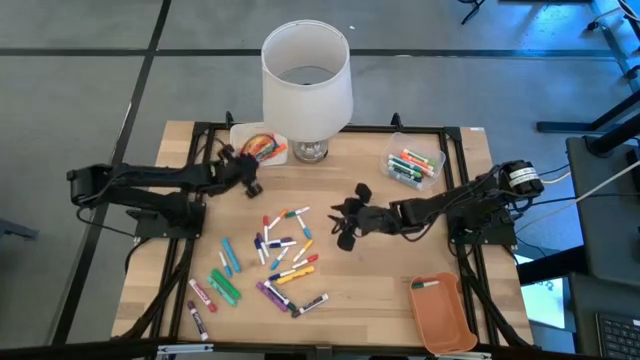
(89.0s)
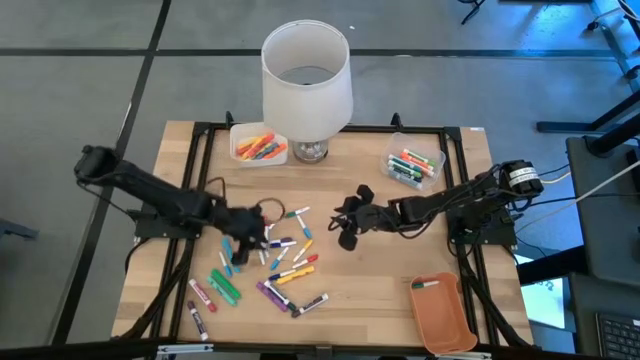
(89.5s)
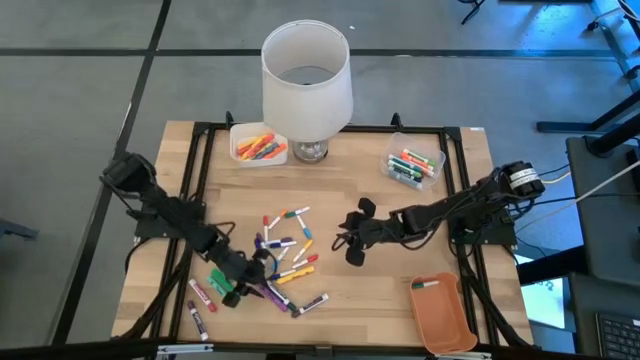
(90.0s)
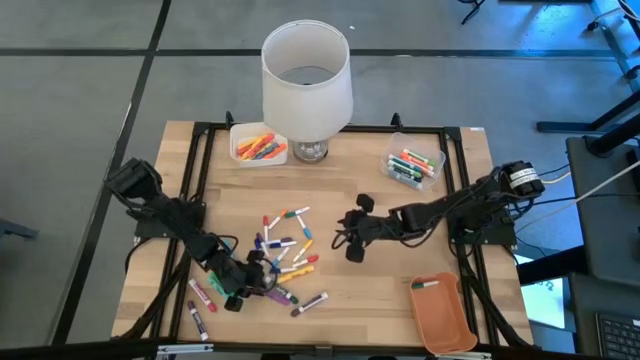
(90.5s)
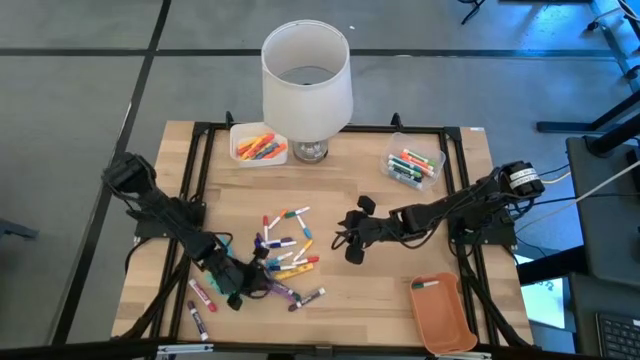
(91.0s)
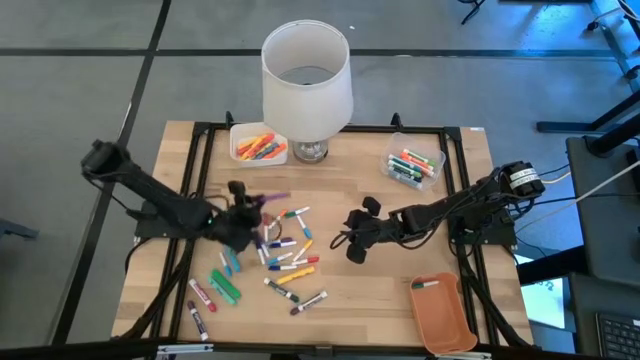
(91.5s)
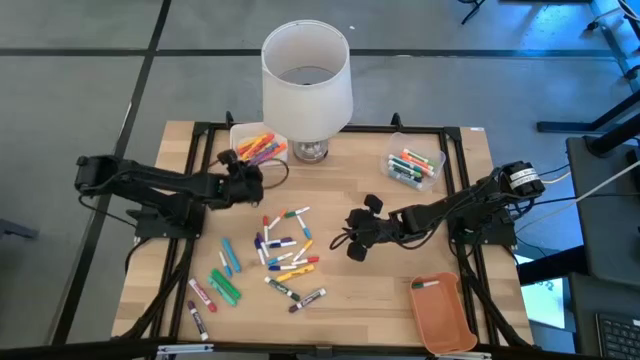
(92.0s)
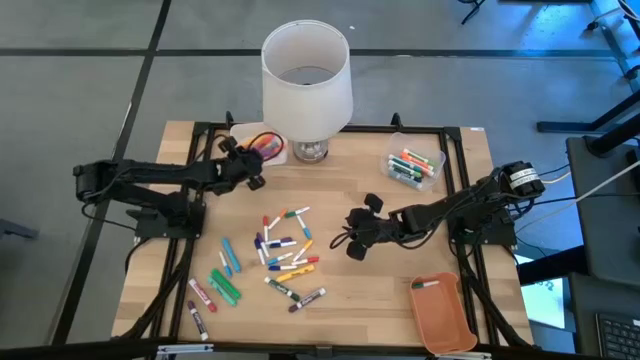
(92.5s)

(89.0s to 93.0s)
Task: Pick & Place Markers
Put the purple highlighter into the white bin

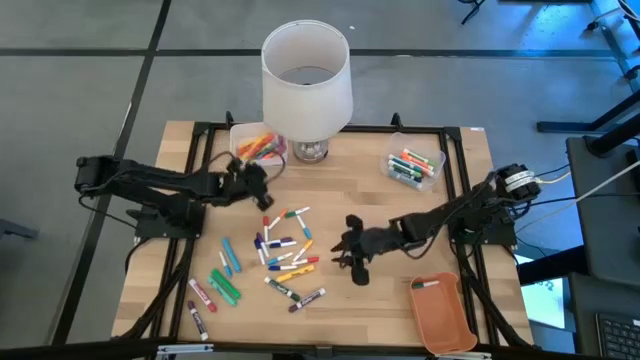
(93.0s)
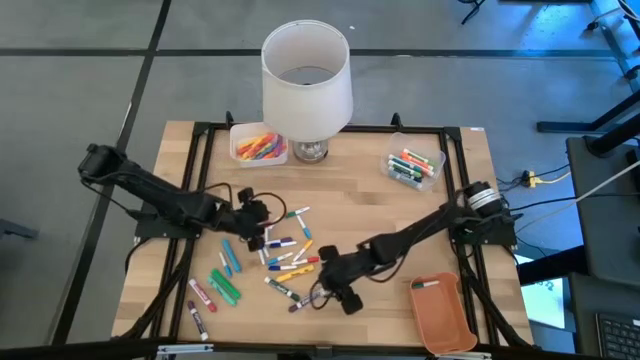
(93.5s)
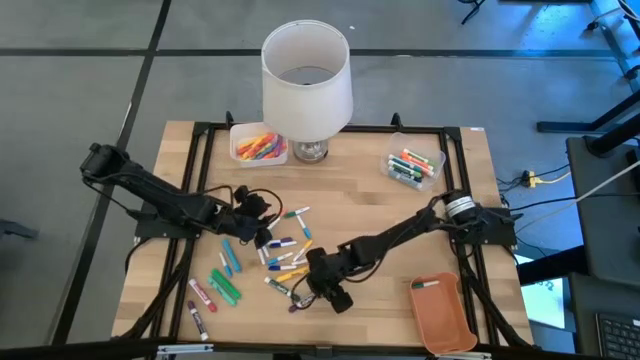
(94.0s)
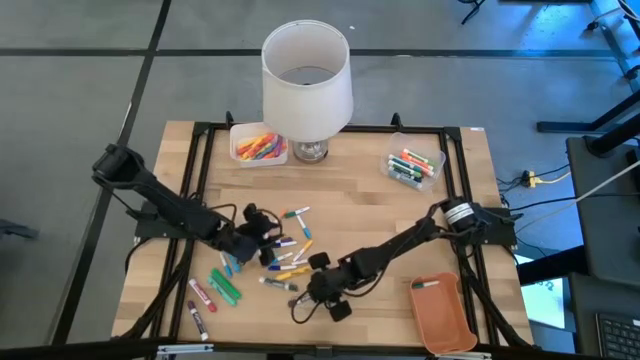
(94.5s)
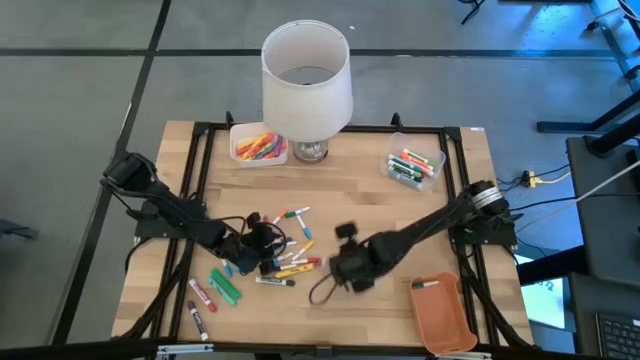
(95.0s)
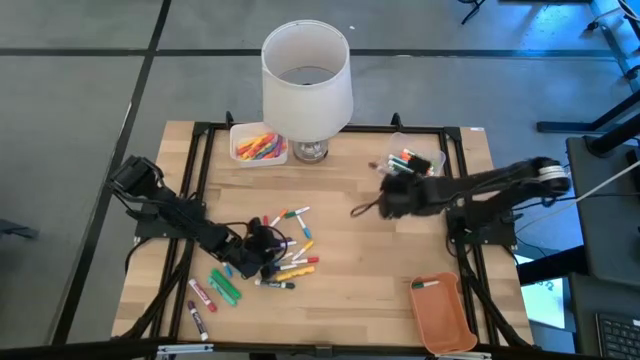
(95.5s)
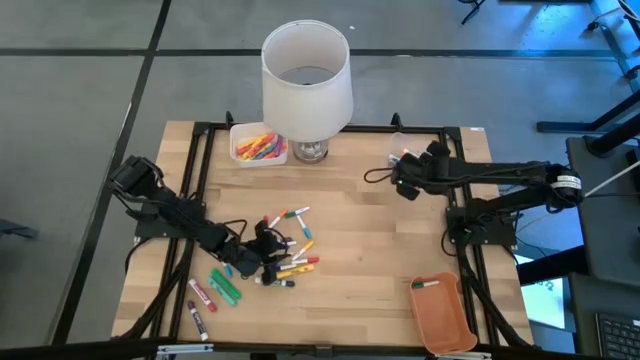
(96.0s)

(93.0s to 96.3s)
Put the thick purple dry erase marker into the transparent bin

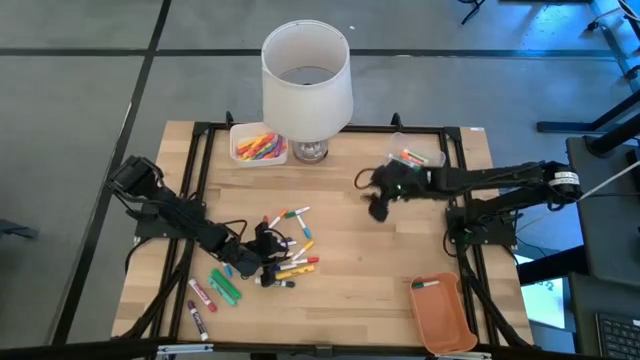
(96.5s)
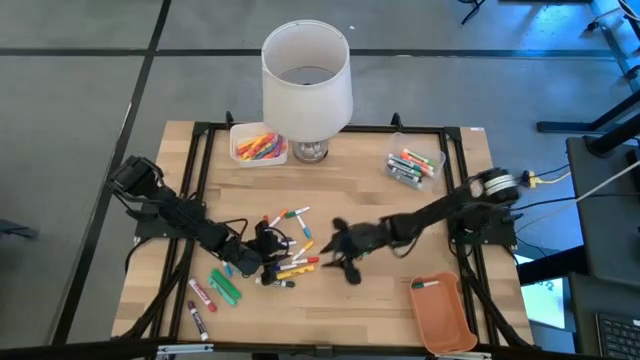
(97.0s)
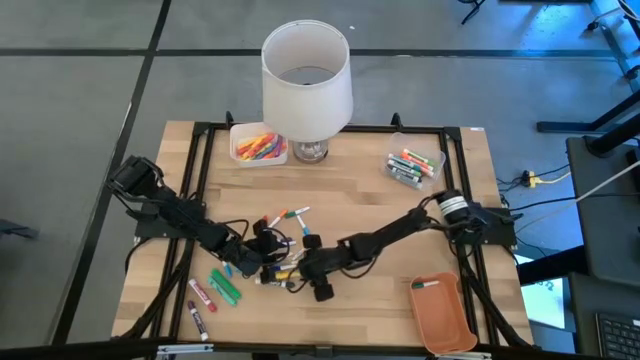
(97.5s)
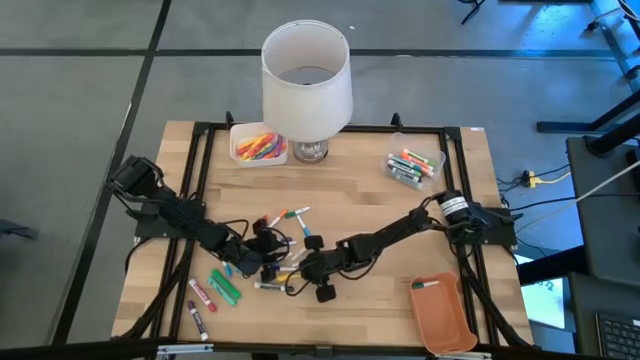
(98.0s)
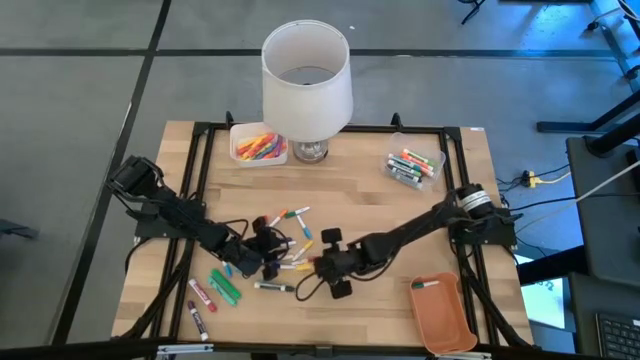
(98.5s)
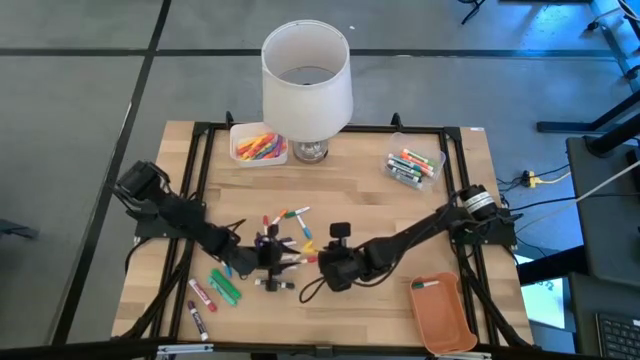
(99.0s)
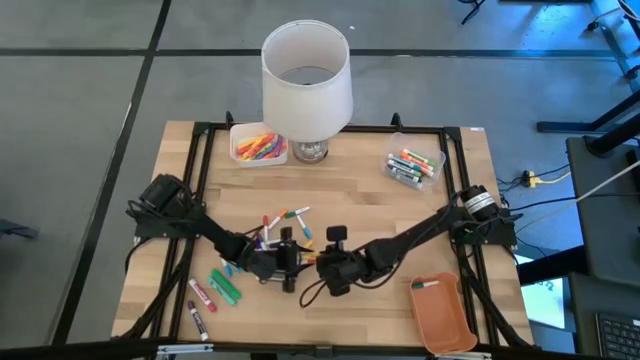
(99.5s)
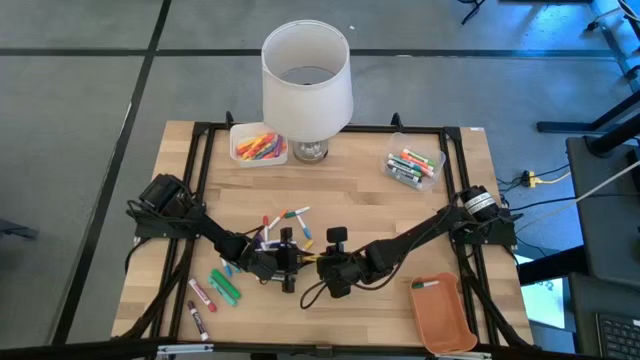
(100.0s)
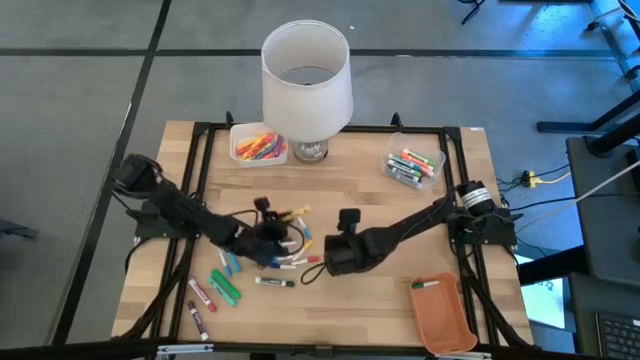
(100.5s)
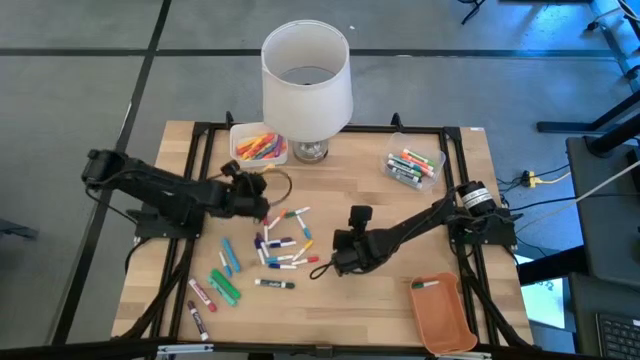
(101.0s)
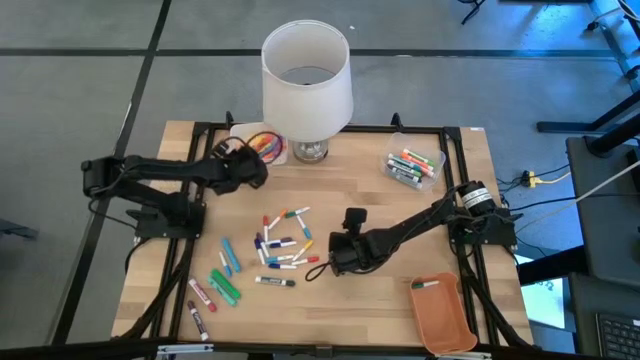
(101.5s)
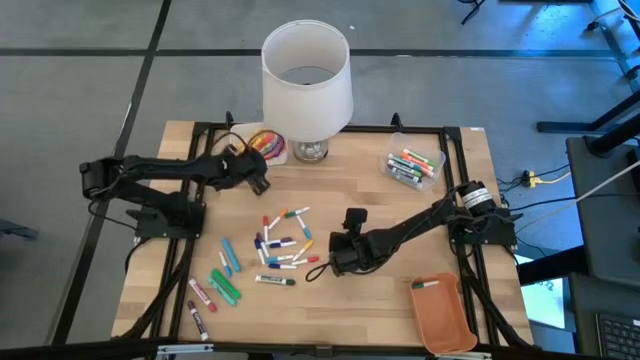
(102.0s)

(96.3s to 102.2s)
Put the yellow highlighter into the white bin

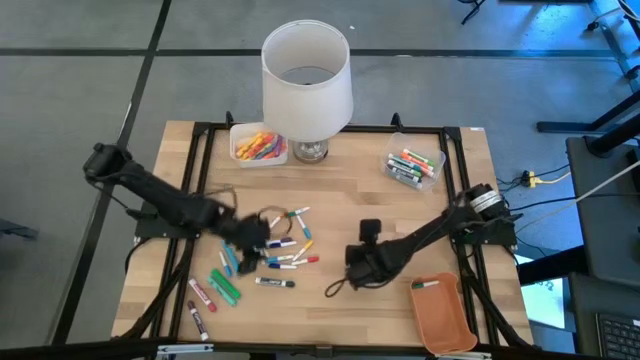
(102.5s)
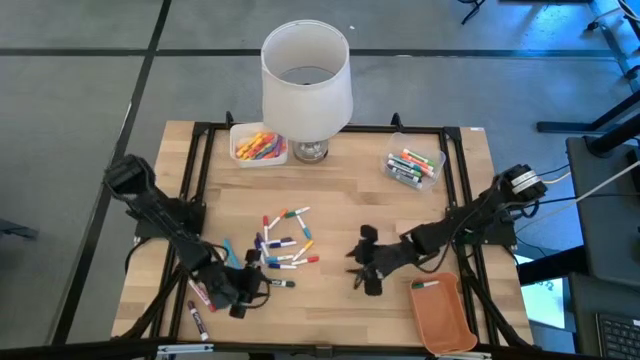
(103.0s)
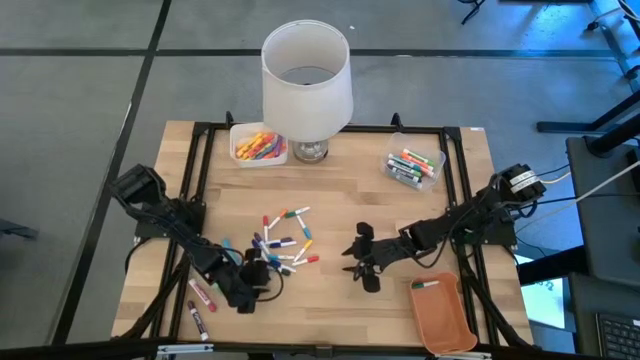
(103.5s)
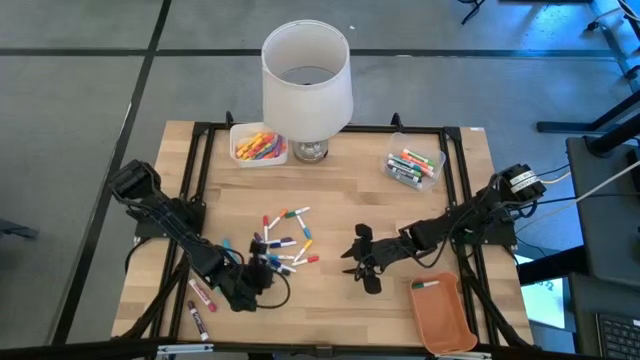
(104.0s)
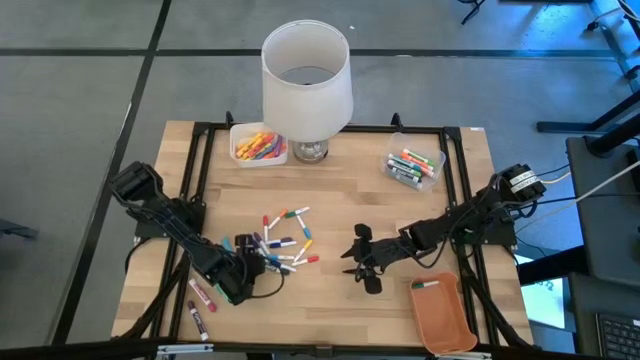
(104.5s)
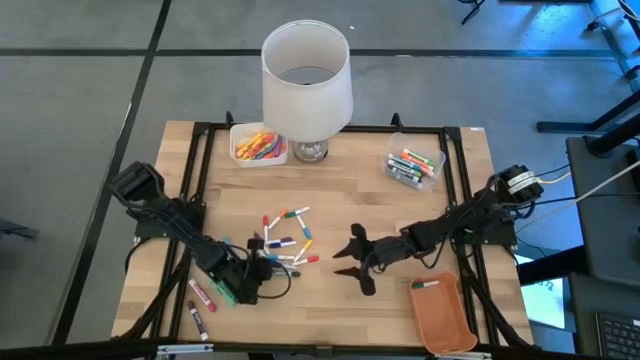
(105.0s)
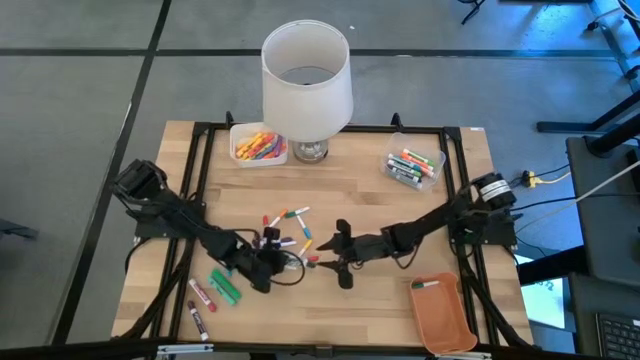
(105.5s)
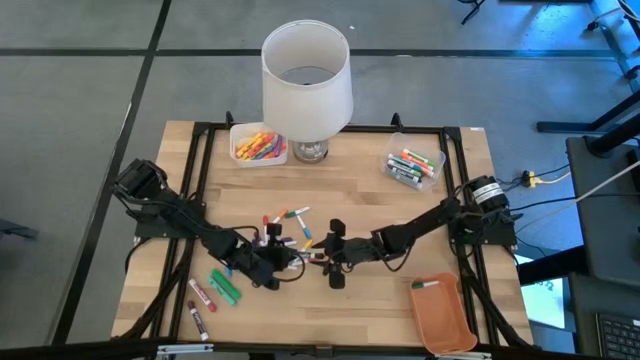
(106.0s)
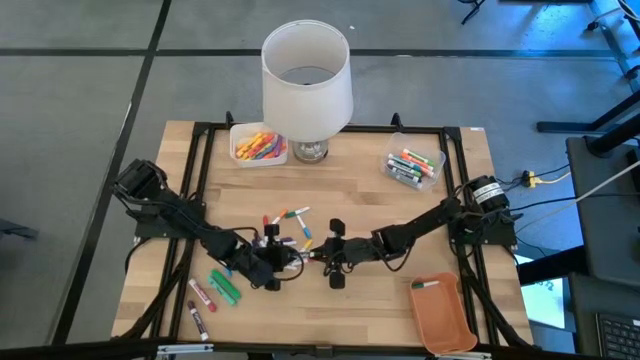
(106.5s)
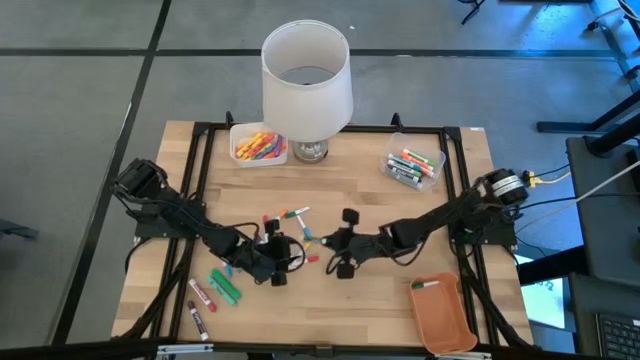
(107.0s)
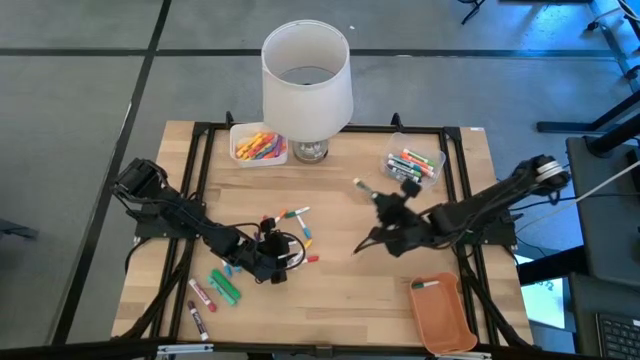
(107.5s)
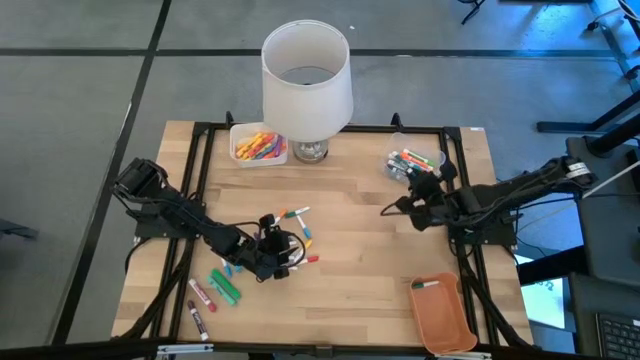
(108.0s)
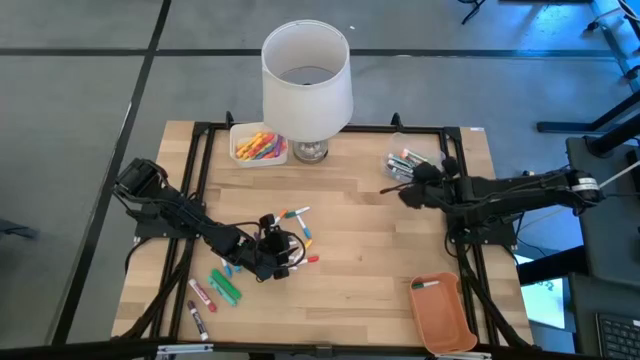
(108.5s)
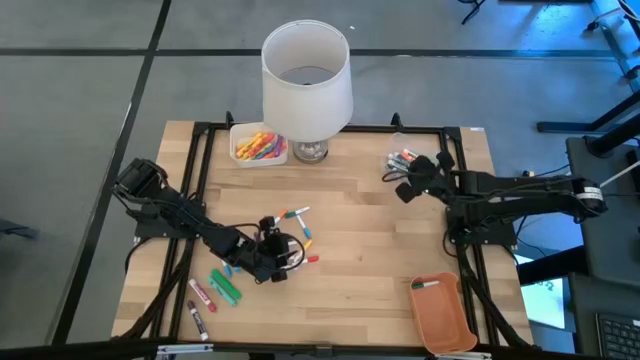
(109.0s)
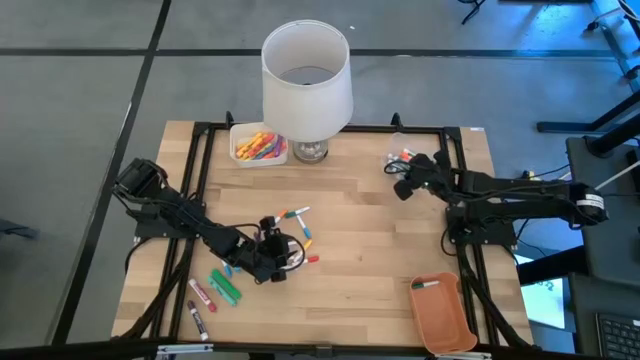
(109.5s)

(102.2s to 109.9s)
Put the thick dark green dry erase marker into the transparent bin

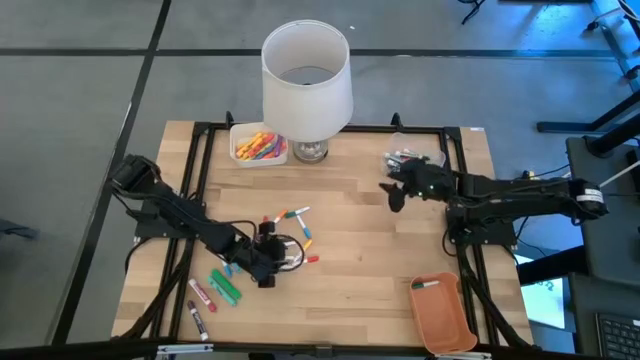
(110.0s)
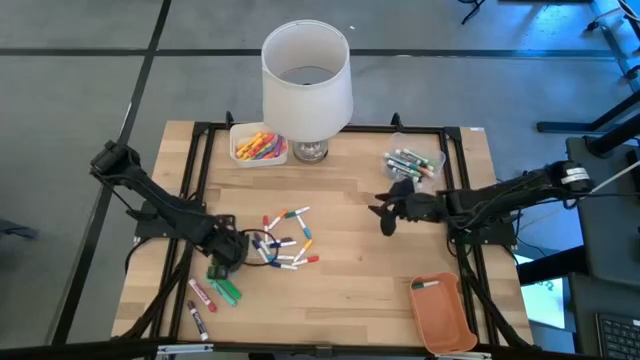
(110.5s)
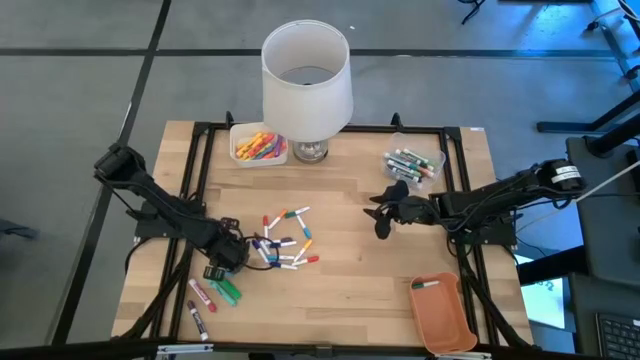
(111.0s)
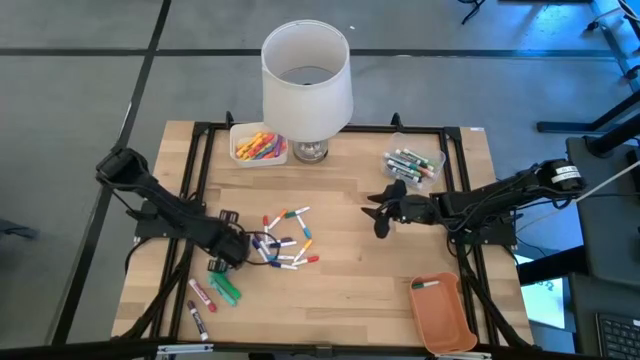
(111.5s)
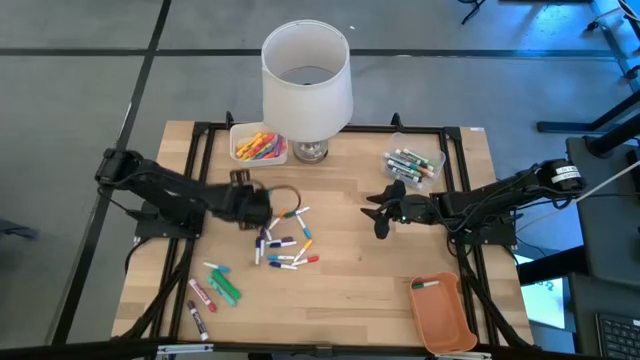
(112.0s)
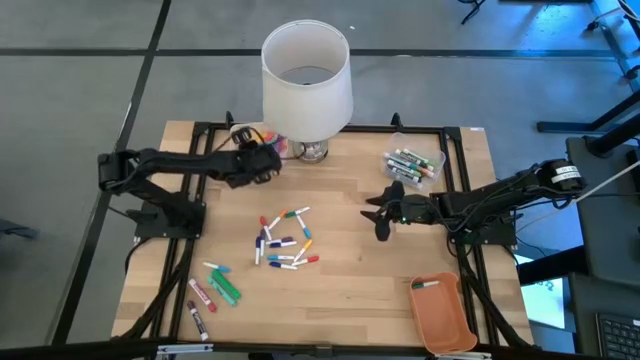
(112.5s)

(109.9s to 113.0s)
Put the light blue highlighter into the white bin
